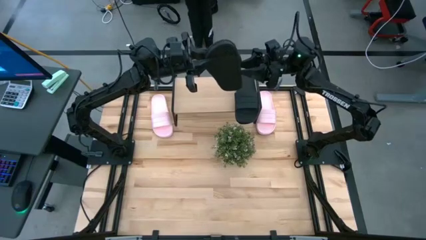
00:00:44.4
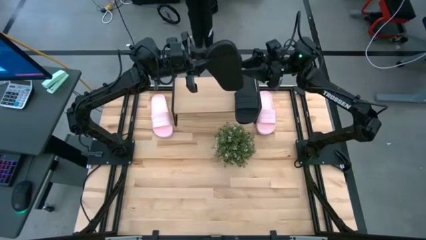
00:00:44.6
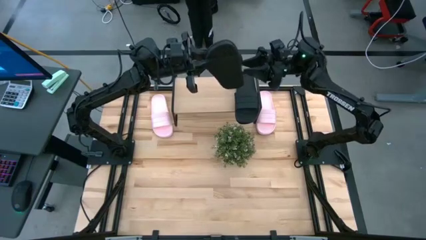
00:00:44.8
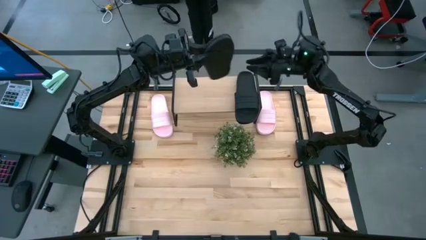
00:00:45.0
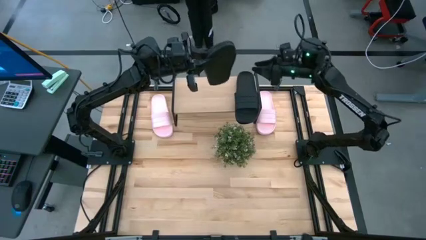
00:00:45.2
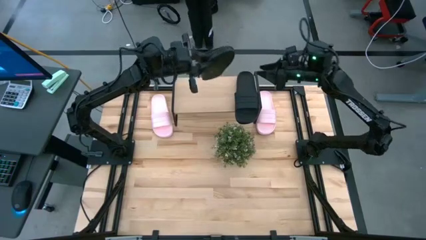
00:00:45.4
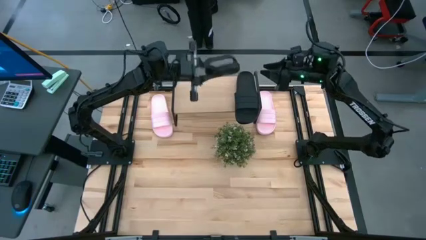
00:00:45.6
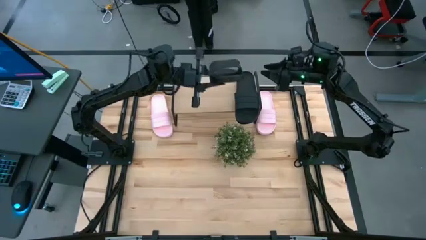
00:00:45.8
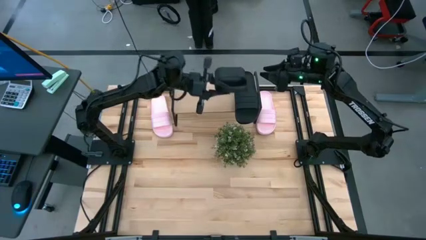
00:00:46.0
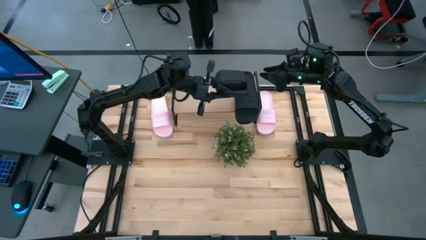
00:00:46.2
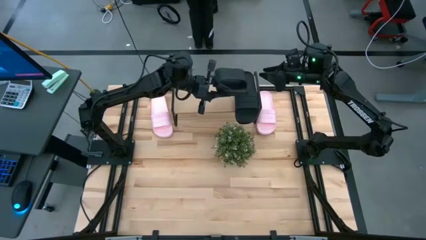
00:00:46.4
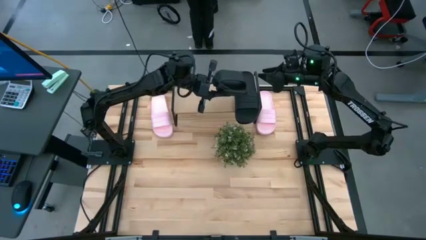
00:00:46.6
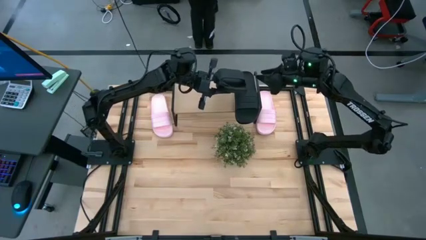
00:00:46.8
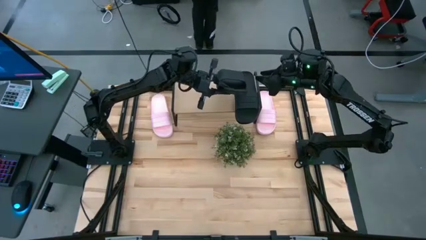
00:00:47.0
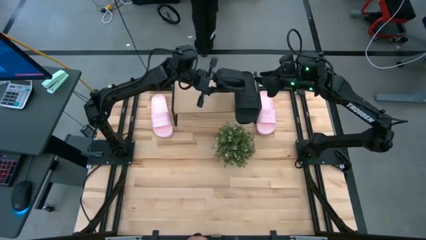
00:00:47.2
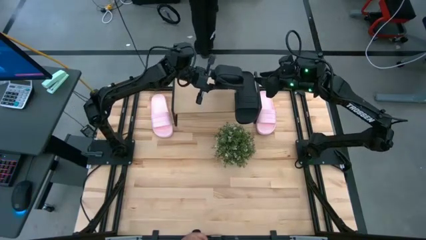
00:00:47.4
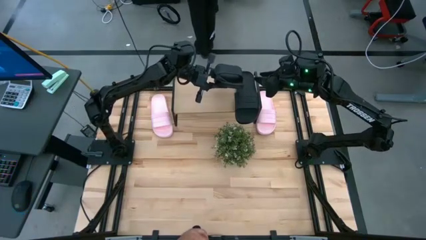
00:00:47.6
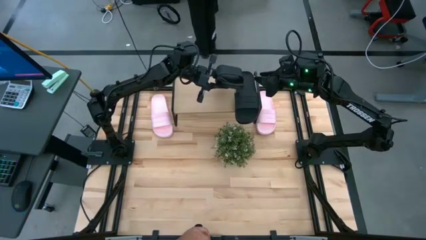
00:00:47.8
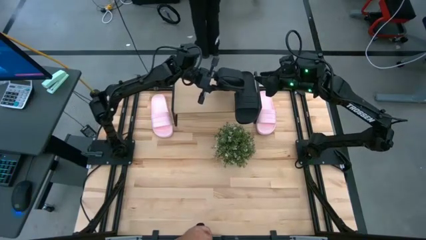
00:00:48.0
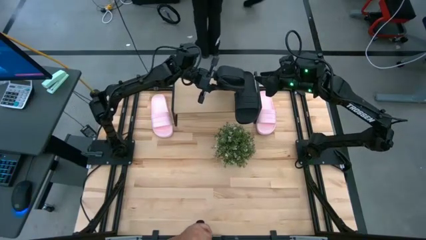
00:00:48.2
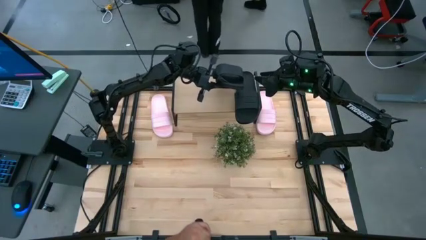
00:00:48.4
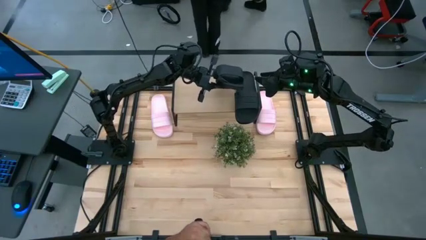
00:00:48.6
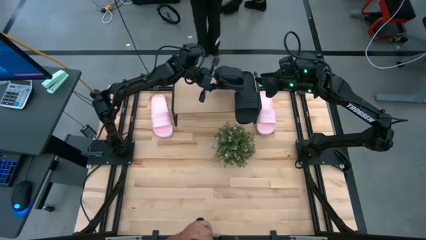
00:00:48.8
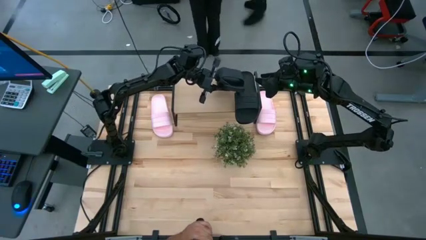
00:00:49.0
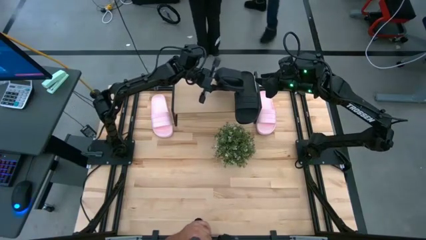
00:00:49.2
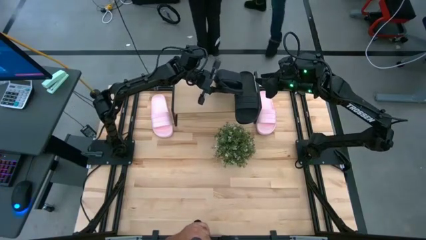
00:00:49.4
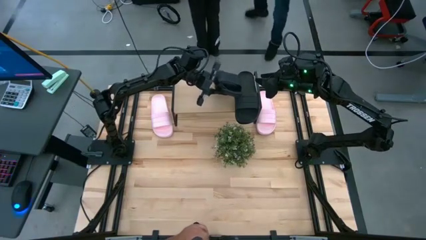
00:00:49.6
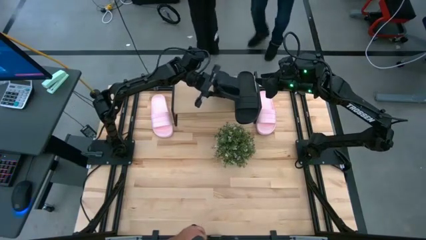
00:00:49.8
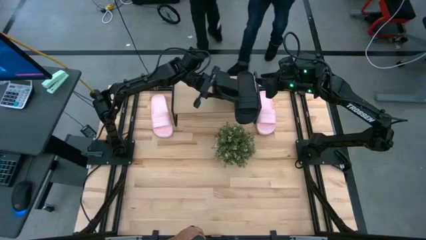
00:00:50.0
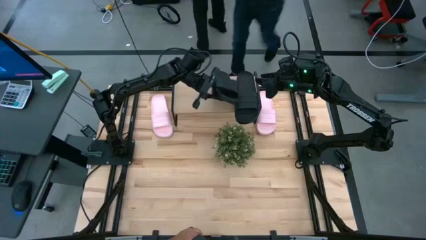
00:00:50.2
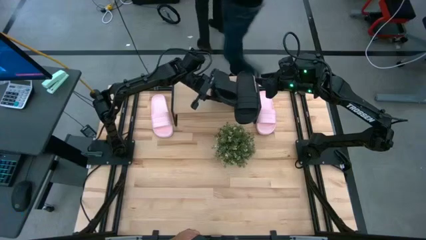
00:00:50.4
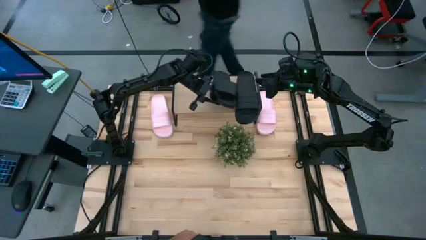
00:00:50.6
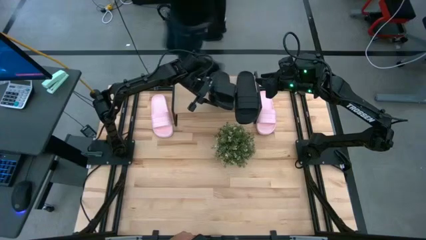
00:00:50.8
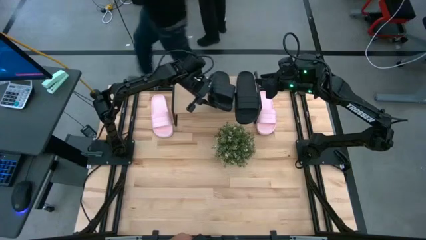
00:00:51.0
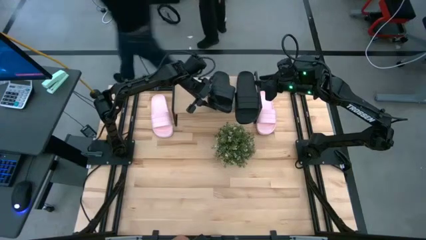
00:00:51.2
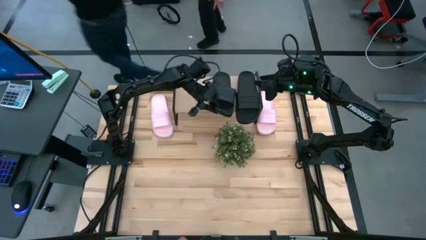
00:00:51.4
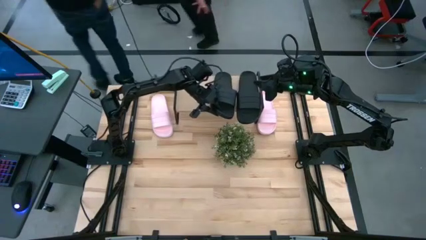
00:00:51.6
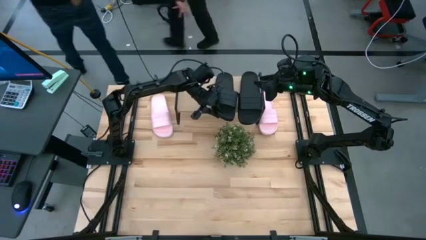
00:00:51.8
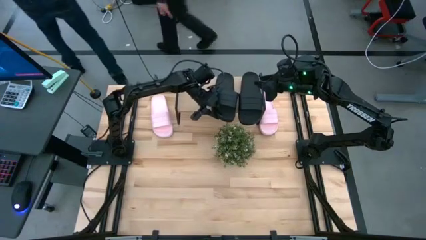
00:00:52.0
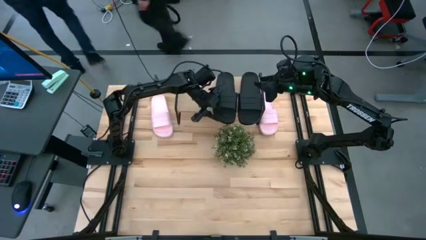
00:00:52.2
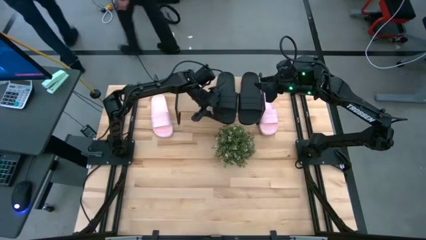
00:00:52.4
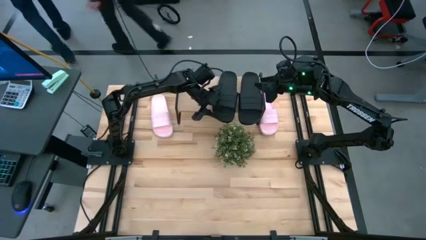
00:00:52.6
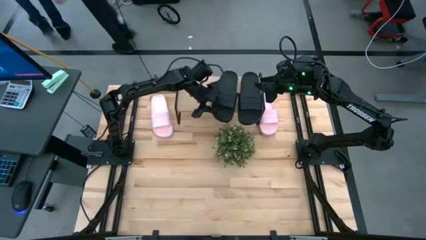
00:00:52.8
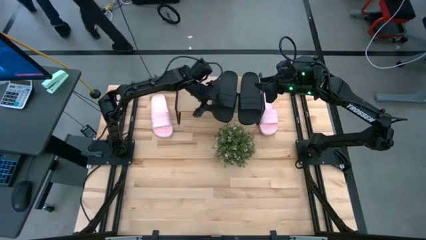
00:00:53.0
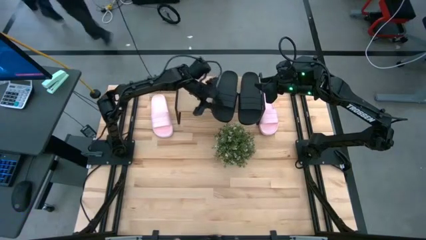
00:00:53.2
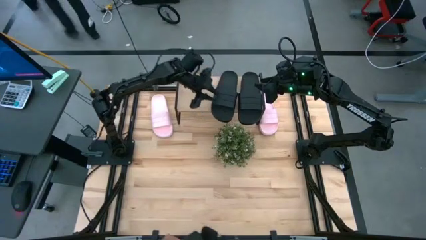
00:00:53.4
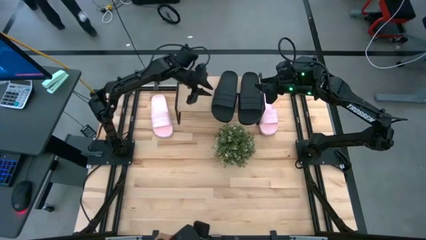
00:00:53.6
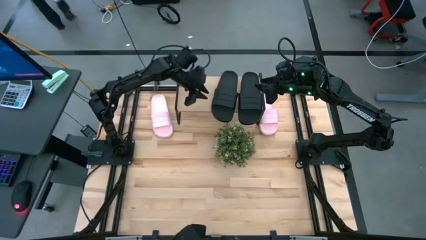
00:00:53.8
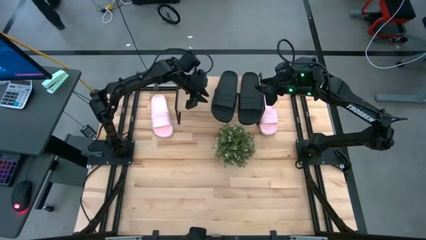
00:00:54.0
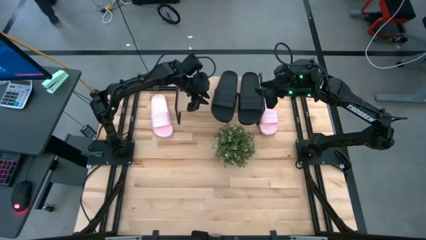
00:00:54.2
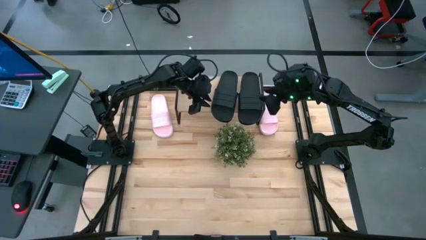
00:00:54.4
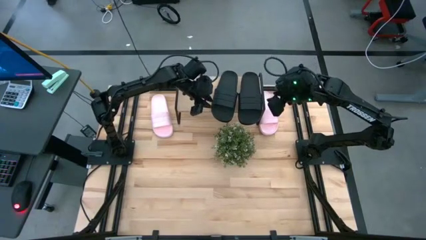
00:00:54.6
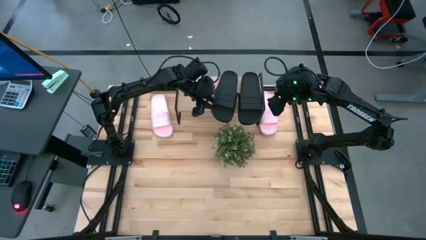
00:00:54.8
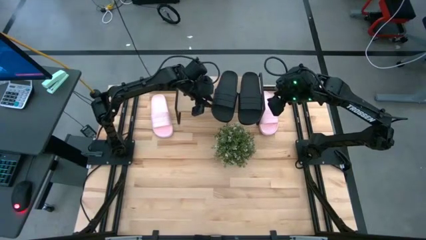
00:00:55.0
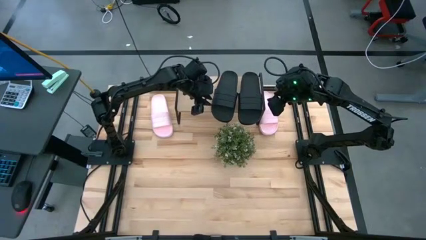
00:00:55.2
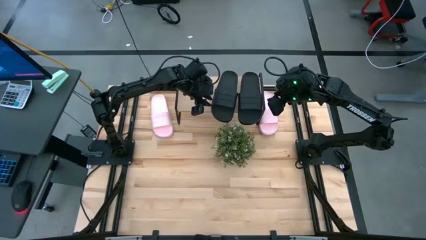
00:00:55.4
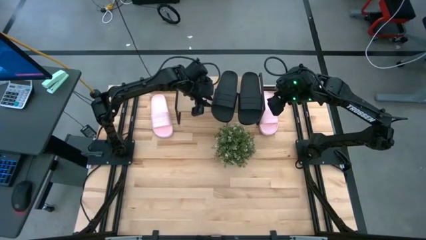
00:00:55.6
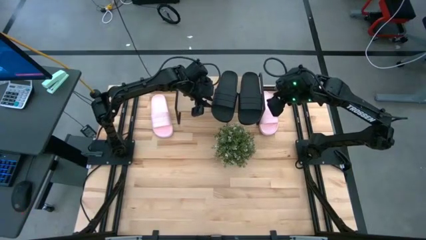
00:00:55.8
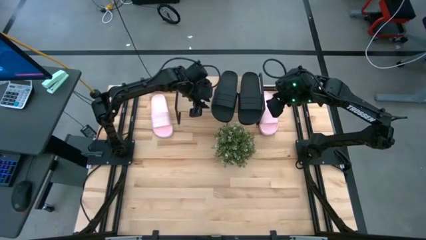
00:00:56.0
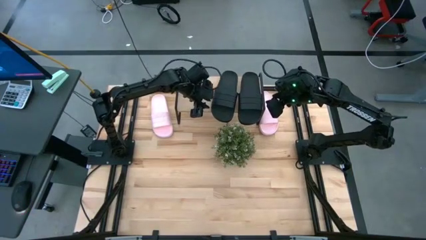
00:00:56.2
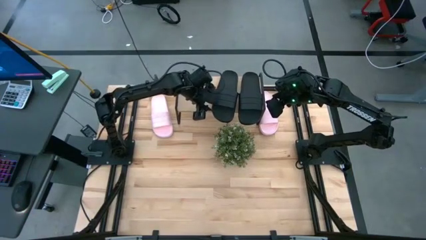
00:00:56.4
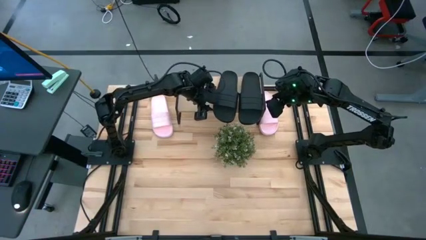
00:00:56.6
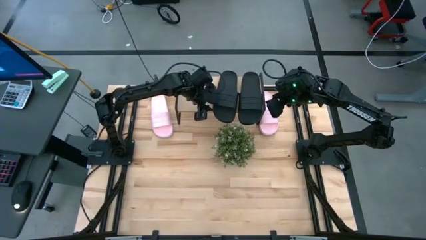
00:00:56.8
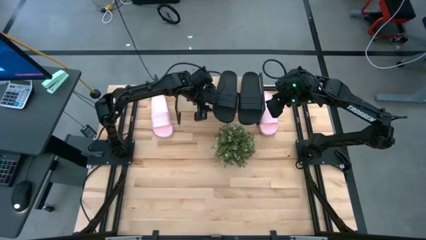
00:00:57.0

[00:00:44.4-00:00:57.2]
Task: Pick and place slides into the shelf
Put the black slipper on the shelf
